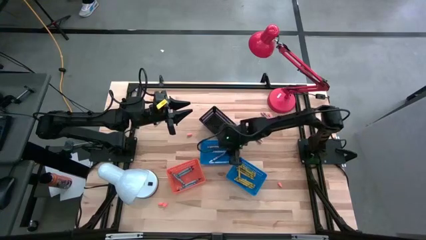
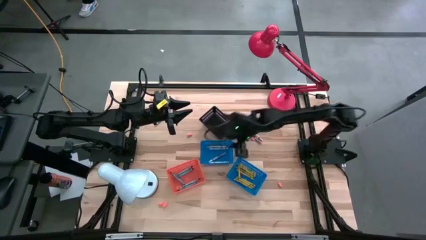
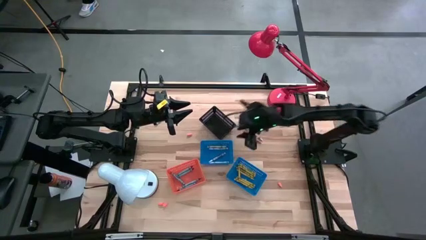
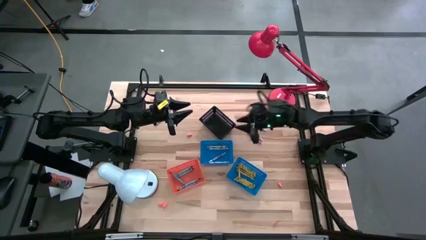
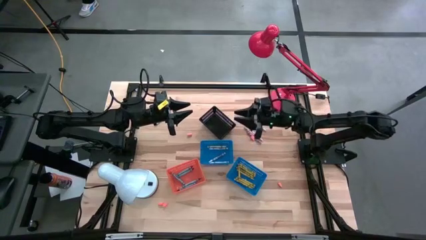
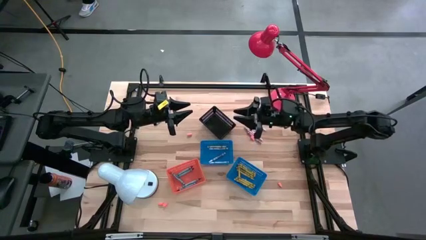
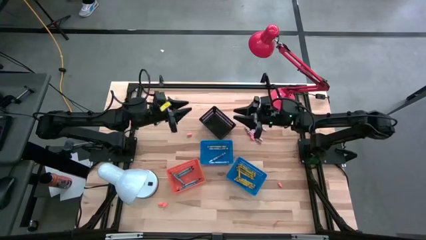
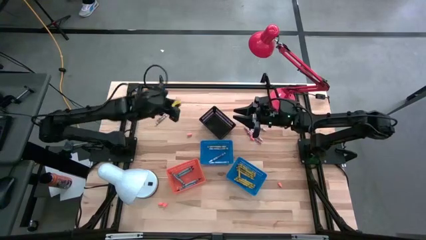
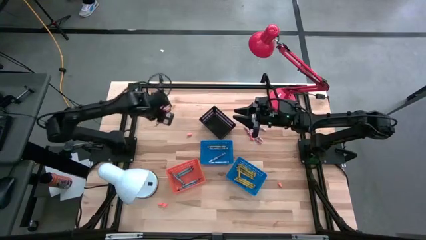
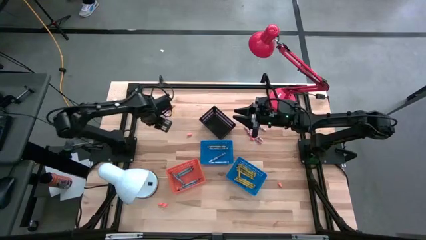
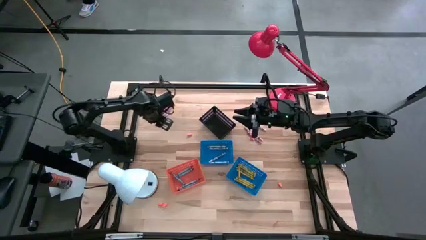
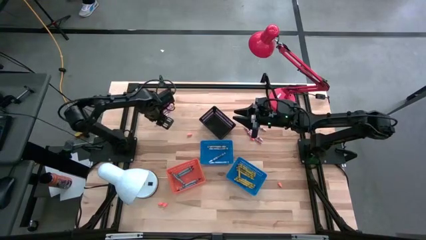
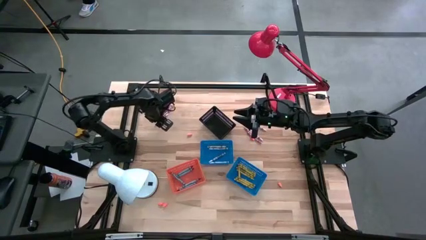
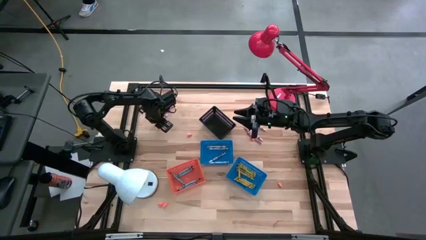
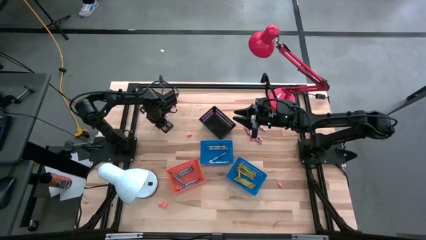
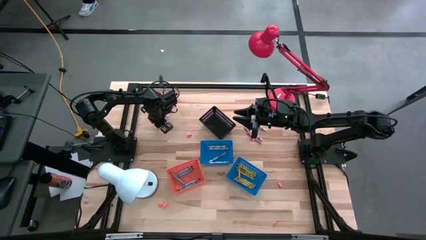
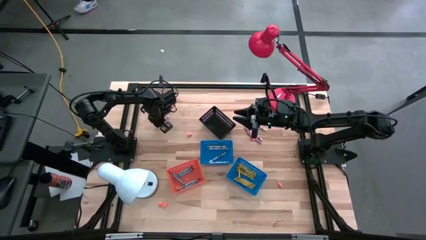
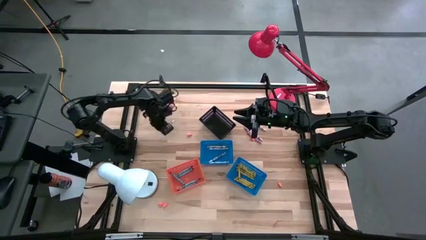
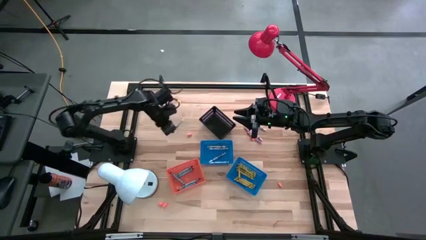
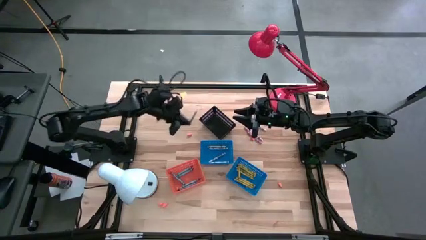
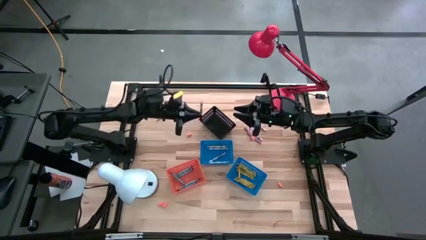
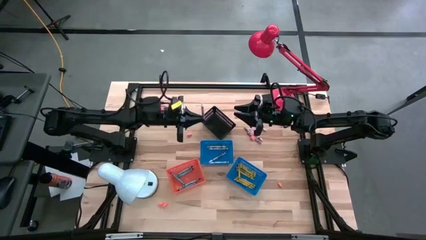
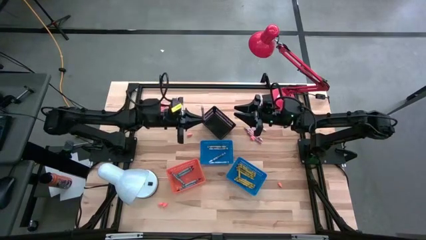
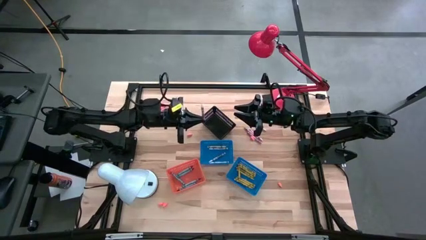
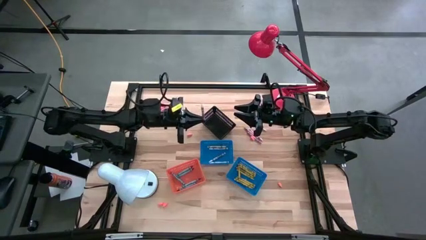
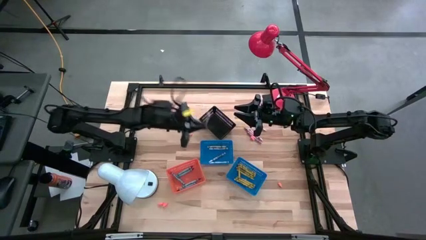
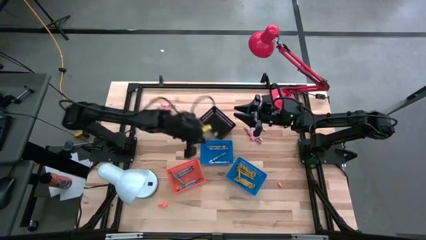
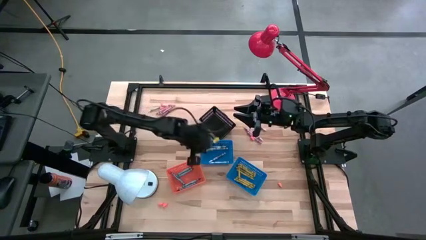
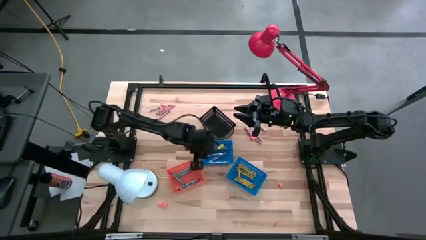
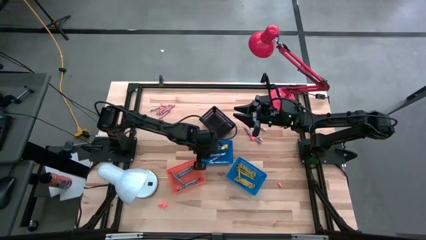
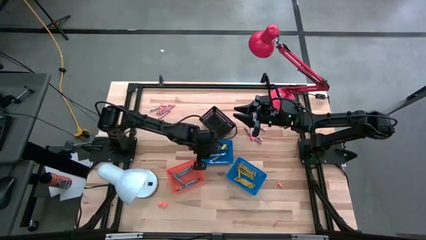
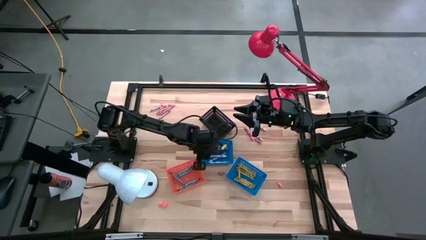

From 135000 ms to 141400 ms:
Task: Sort crayons
Put the white crayon into the left blue bin

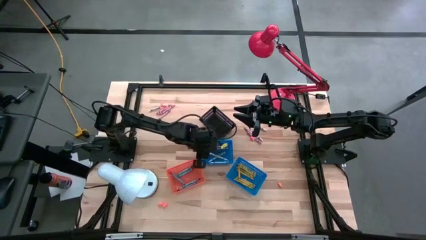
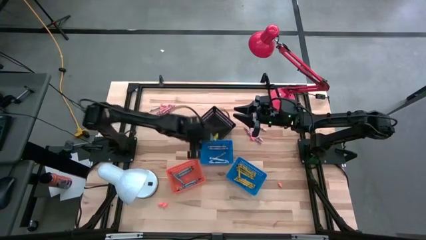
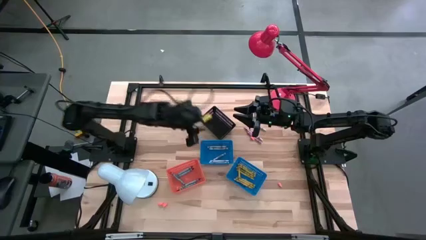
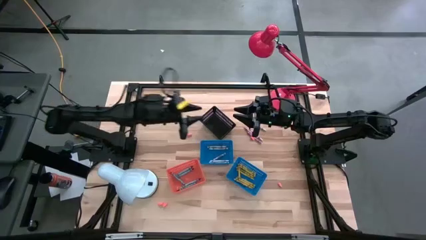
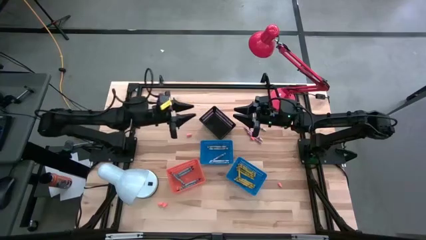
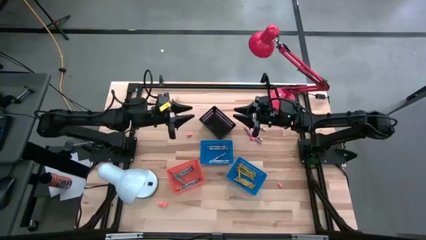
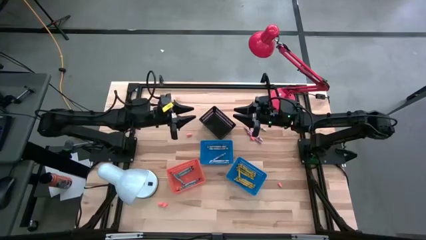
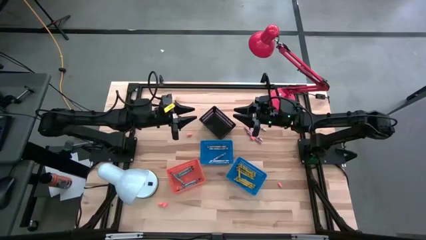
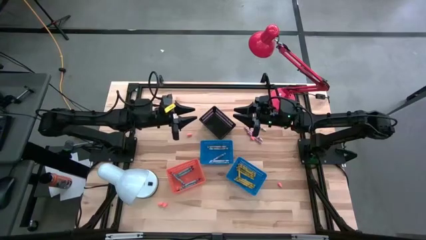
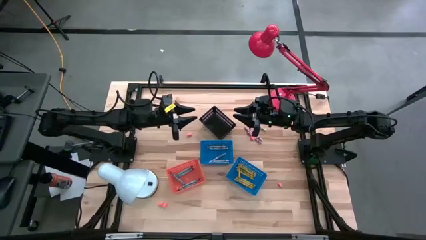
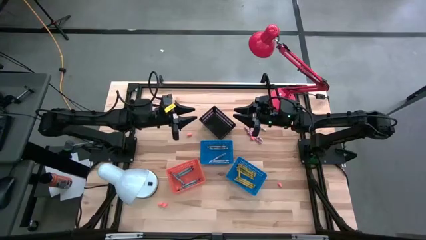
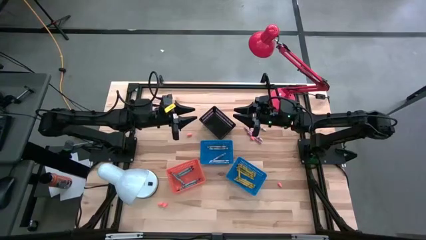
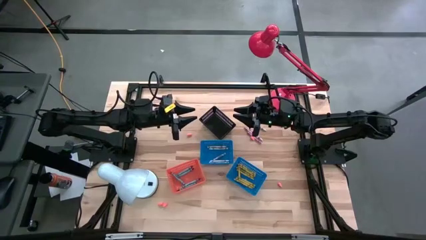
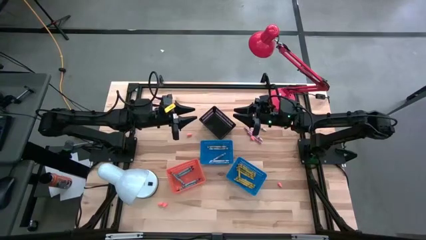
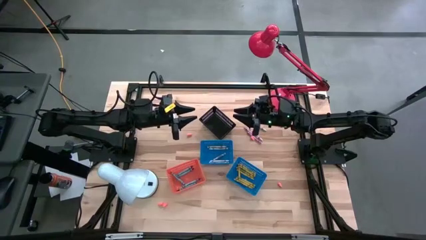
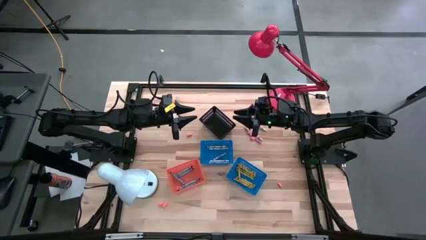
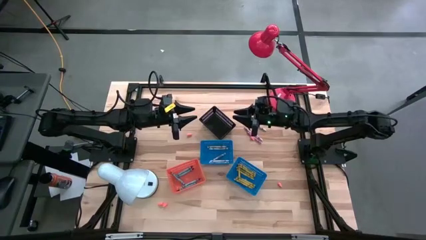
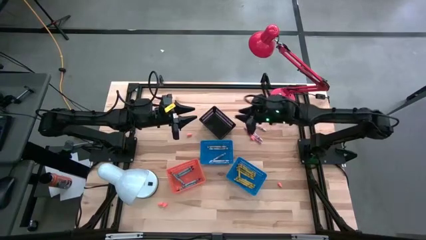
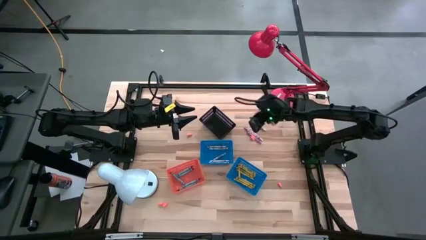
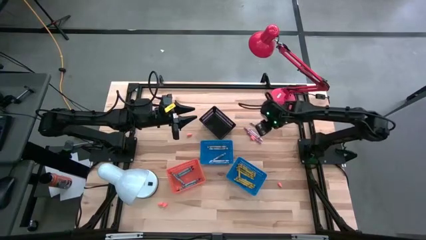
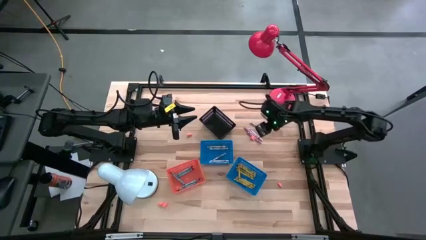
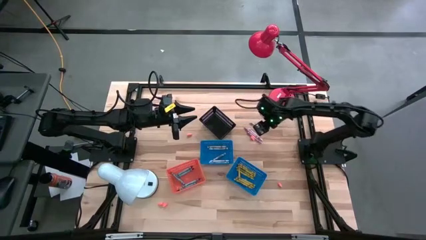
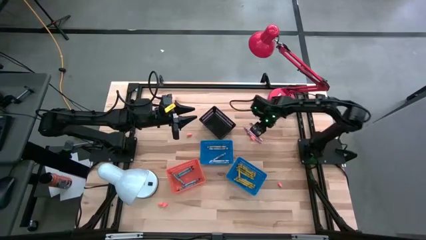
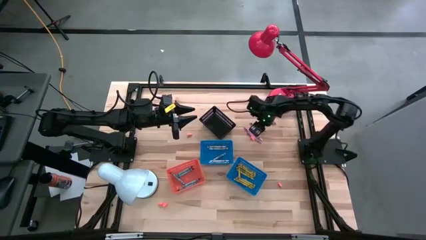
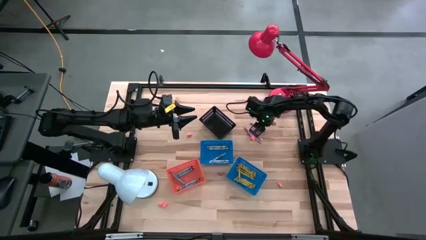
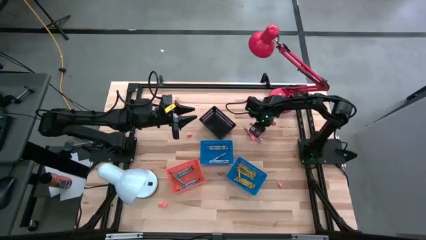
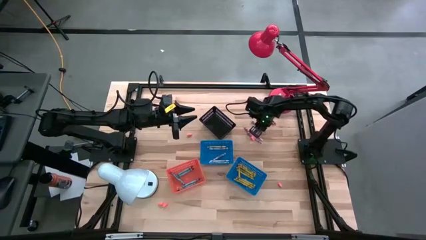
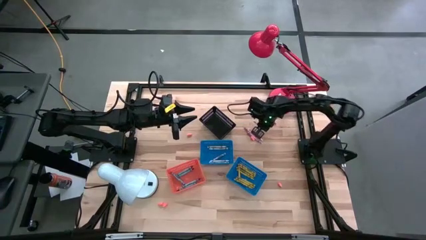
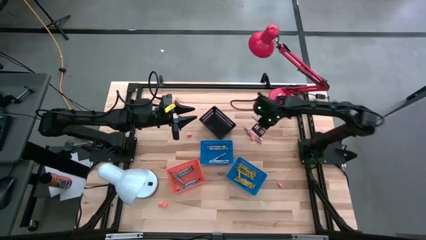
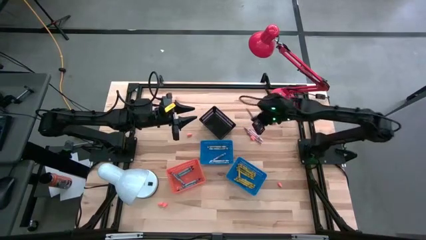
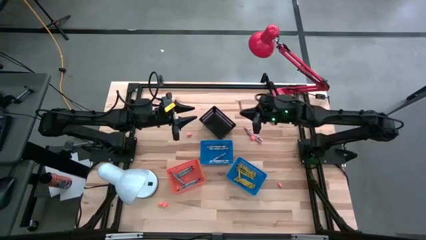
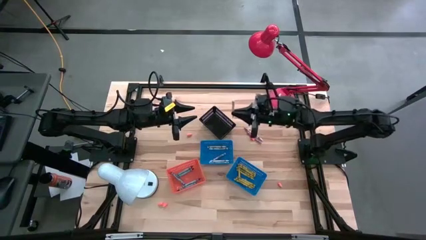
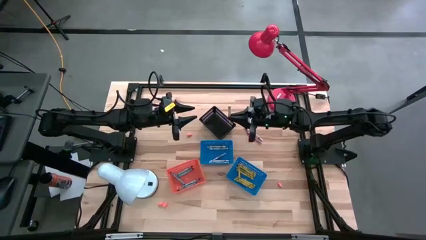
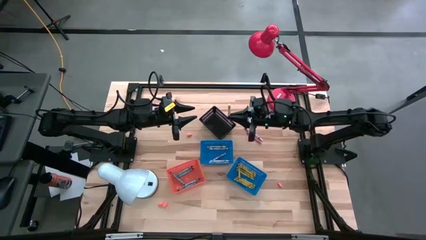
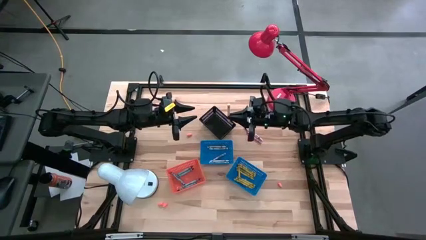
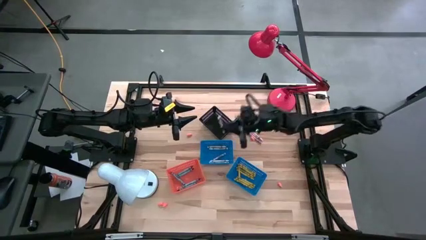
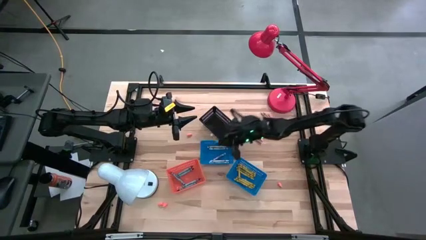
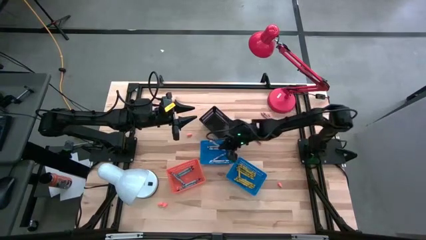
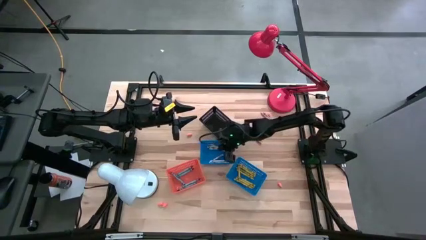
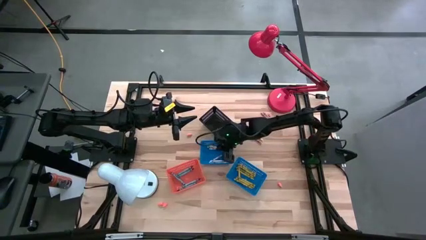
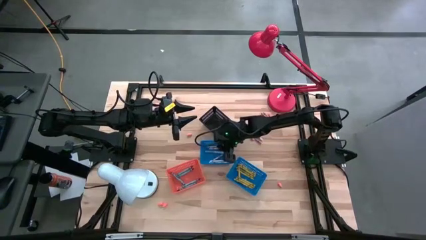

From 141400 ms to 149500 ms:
Put the white crayon into the left blue bin

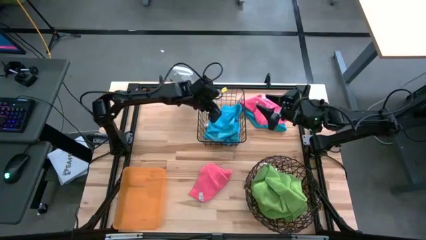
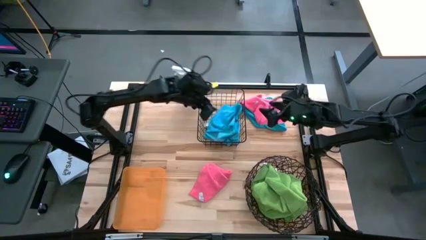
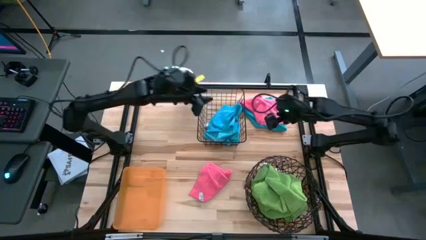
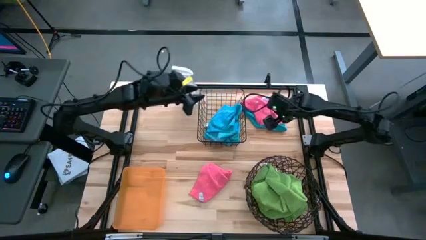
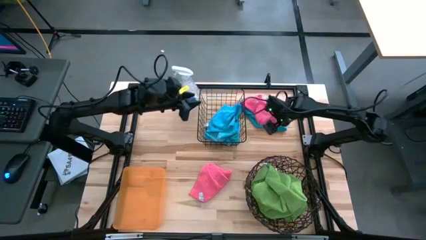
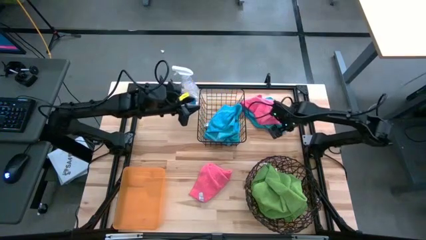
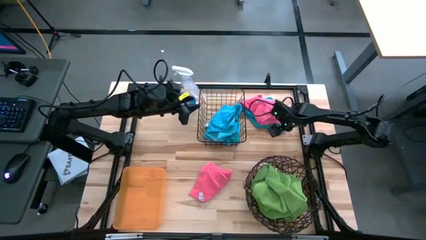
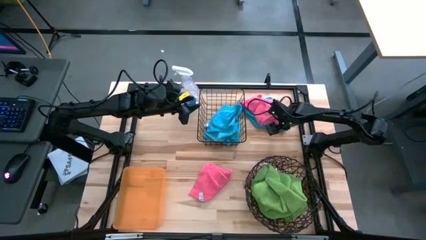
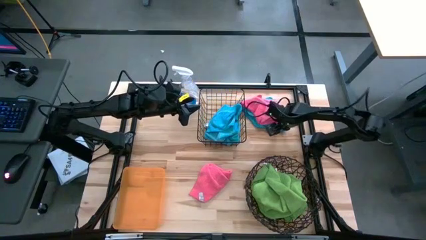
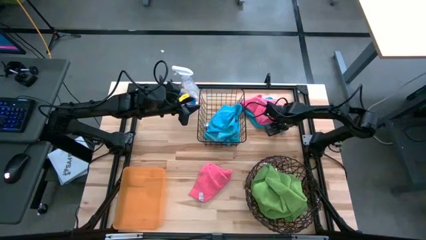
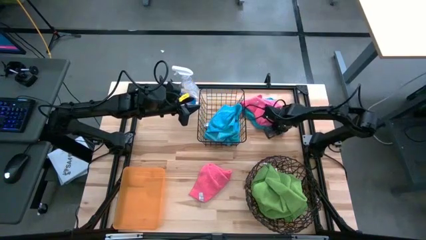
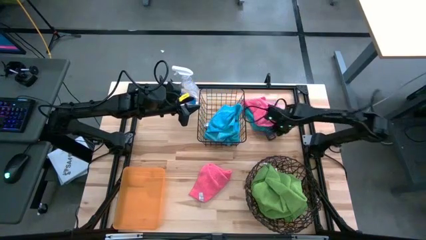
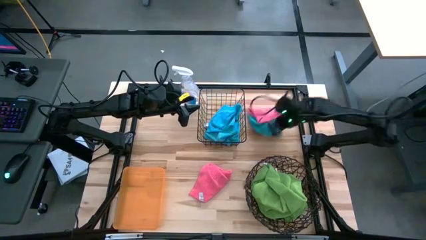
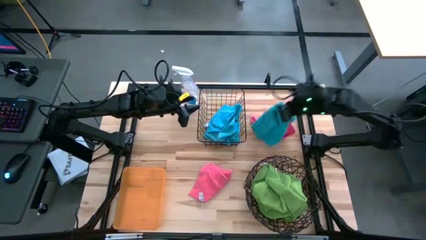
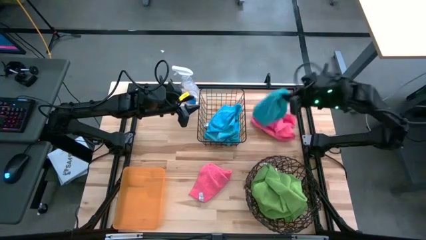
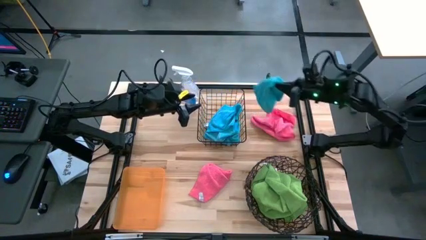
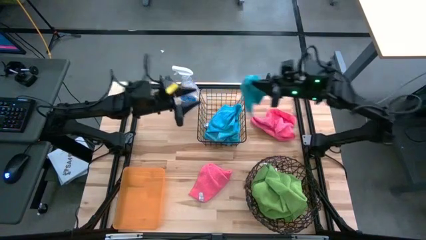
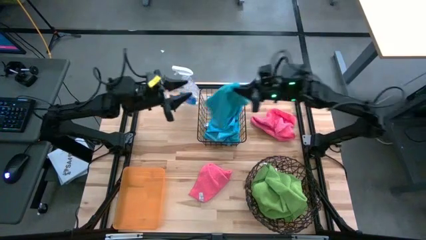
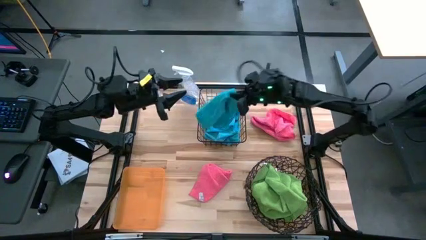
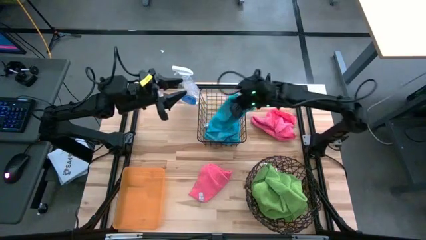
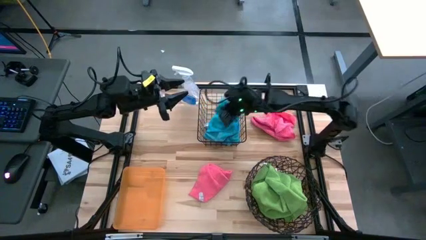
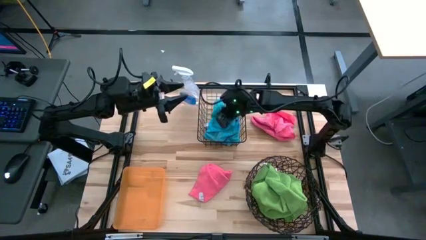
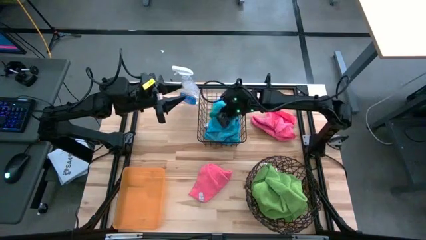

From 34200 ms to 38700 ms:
Task: Sort microfiber towel by color & place in baskets
Put the blue towel into the wire basket
